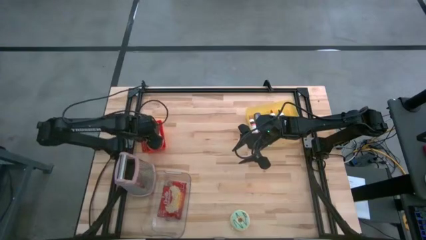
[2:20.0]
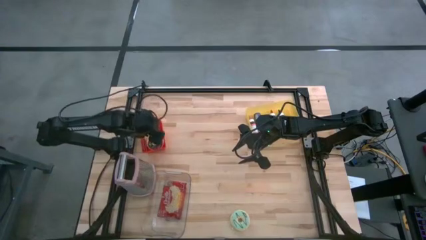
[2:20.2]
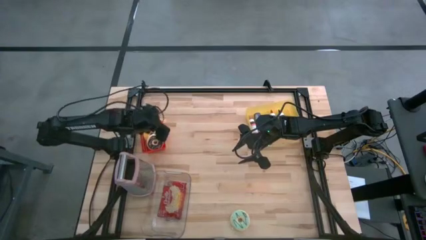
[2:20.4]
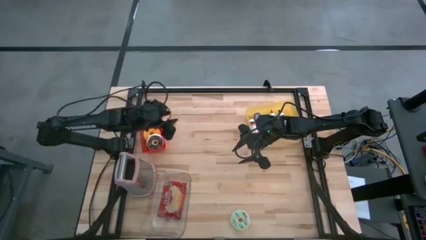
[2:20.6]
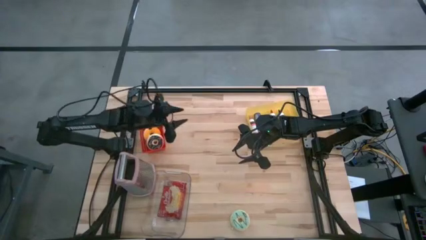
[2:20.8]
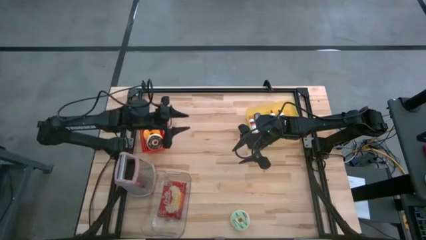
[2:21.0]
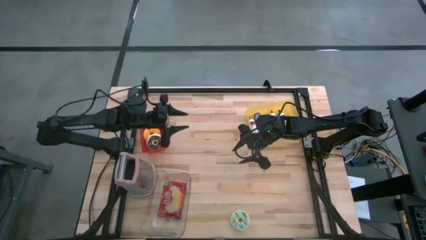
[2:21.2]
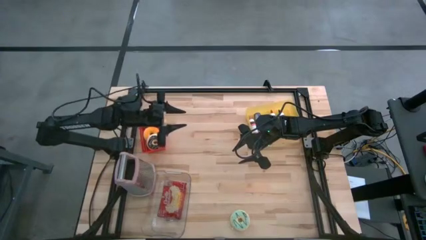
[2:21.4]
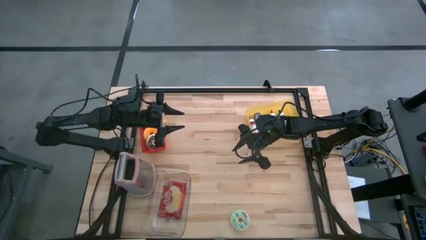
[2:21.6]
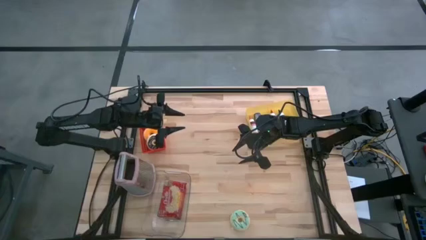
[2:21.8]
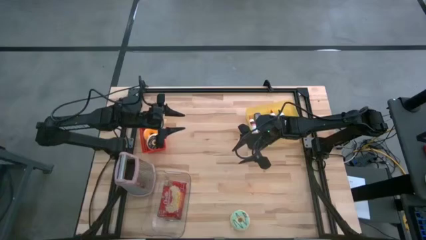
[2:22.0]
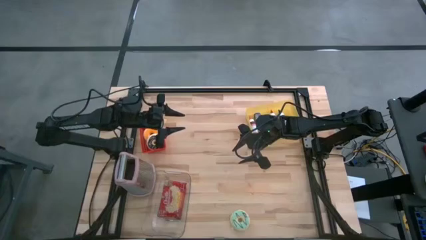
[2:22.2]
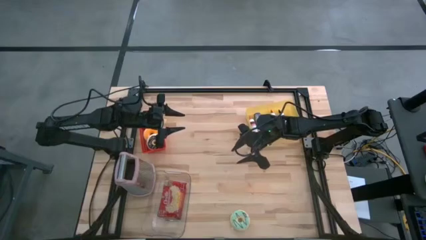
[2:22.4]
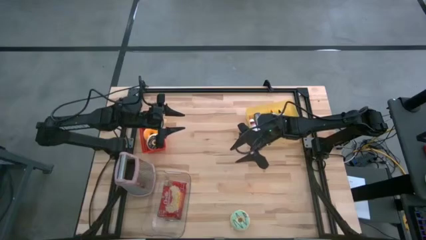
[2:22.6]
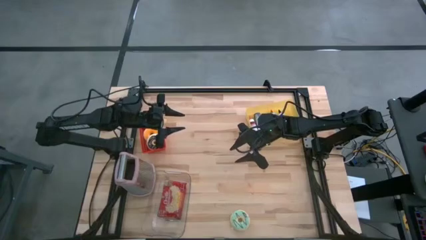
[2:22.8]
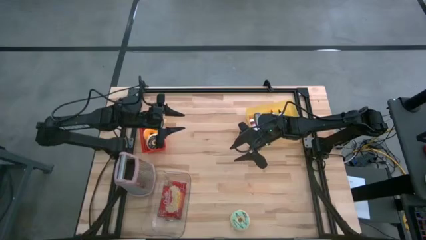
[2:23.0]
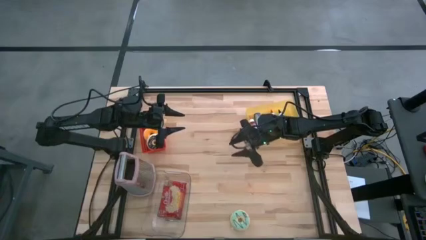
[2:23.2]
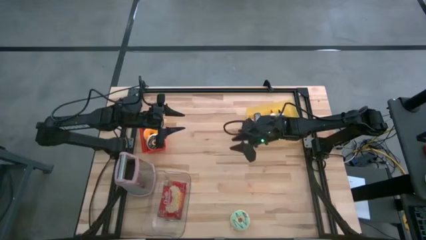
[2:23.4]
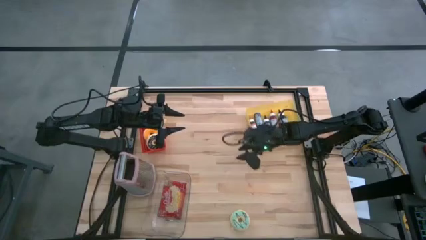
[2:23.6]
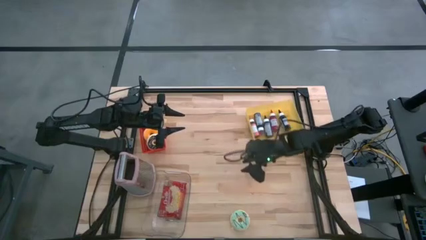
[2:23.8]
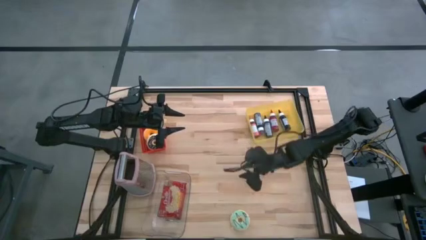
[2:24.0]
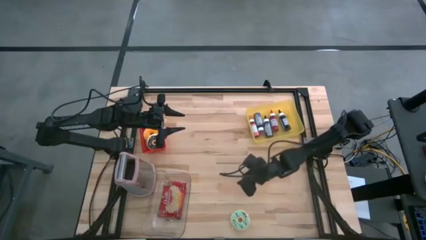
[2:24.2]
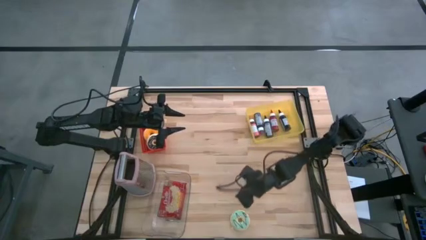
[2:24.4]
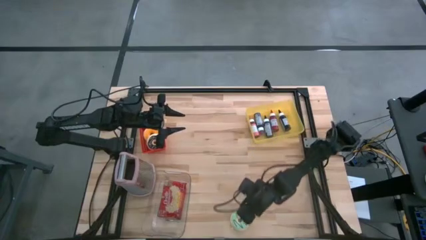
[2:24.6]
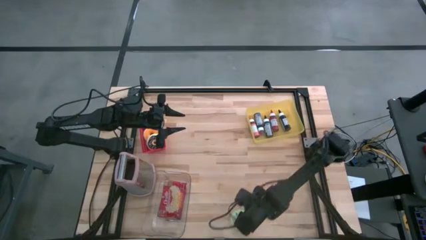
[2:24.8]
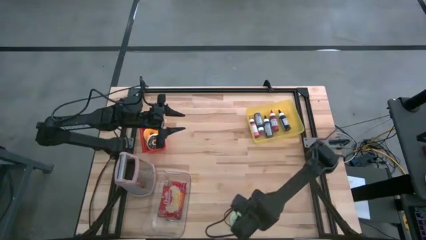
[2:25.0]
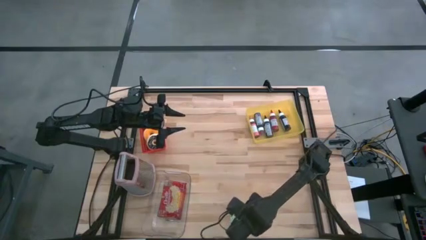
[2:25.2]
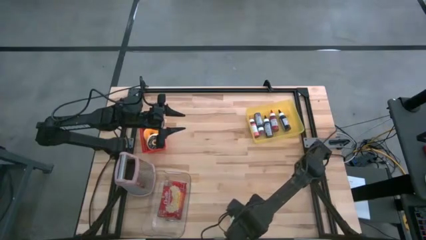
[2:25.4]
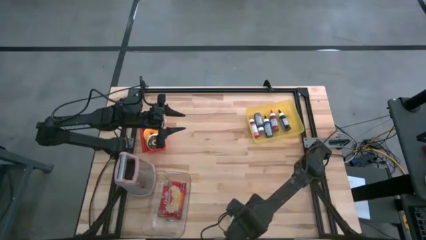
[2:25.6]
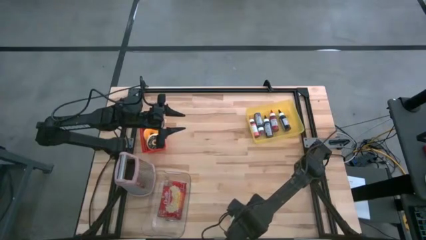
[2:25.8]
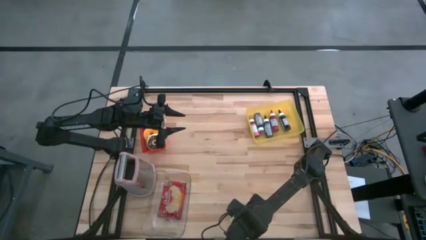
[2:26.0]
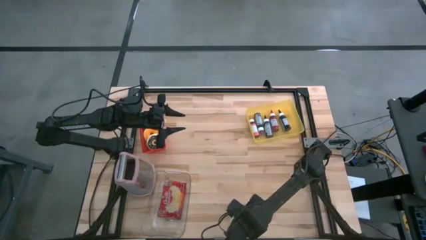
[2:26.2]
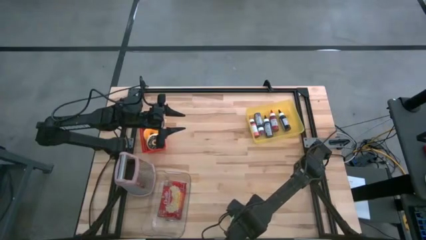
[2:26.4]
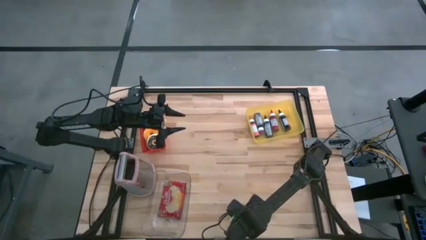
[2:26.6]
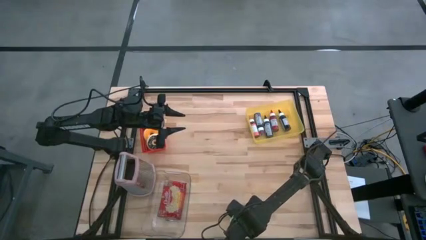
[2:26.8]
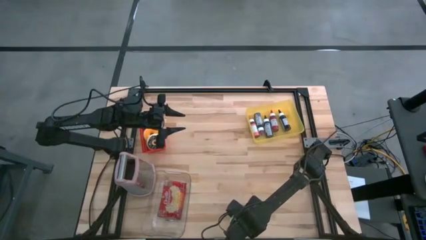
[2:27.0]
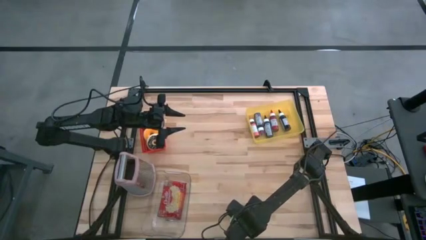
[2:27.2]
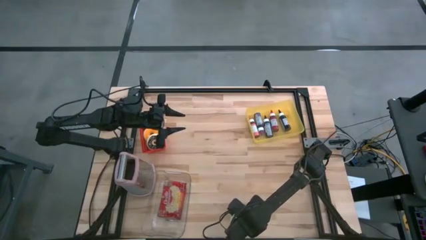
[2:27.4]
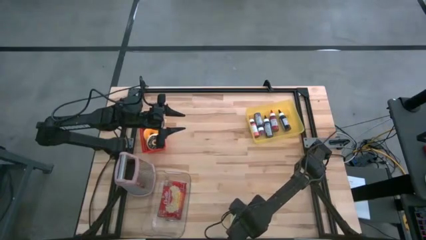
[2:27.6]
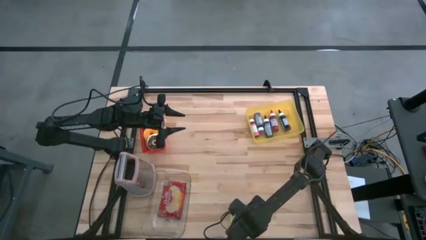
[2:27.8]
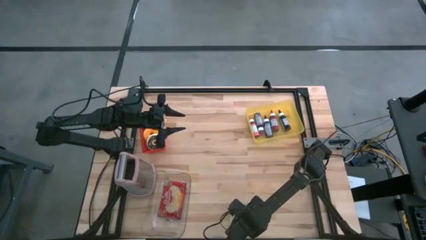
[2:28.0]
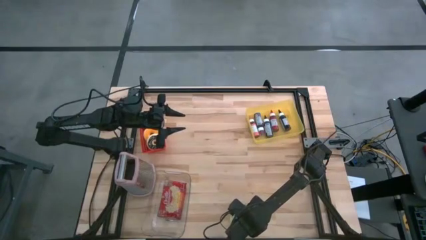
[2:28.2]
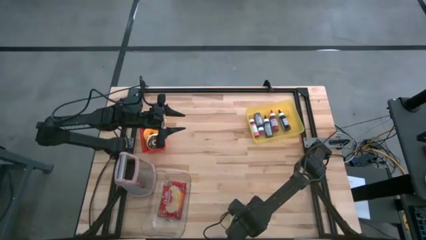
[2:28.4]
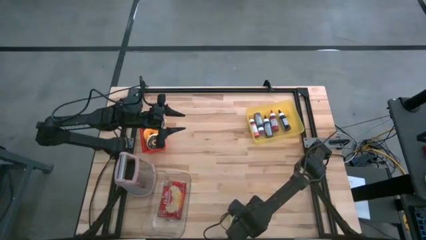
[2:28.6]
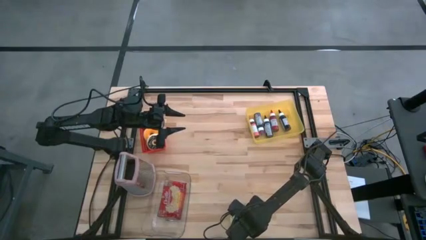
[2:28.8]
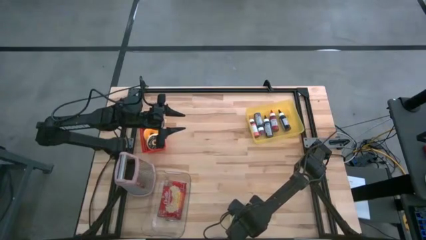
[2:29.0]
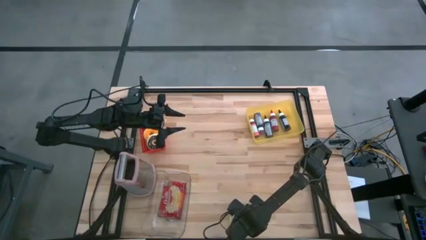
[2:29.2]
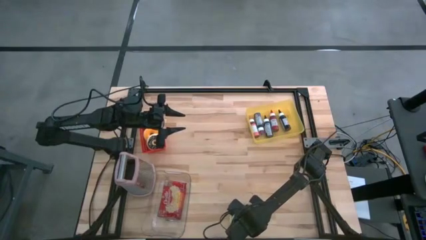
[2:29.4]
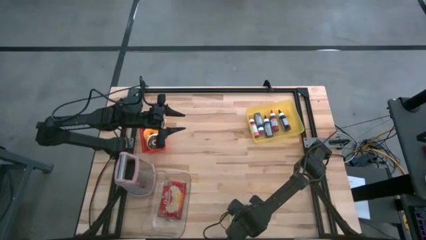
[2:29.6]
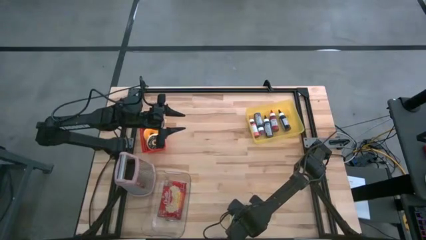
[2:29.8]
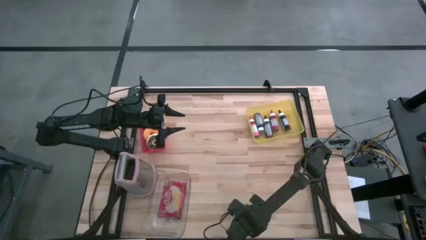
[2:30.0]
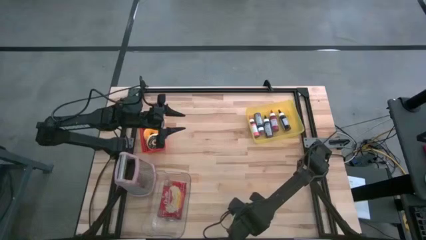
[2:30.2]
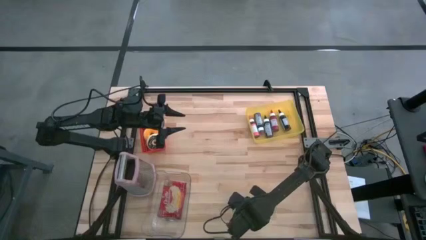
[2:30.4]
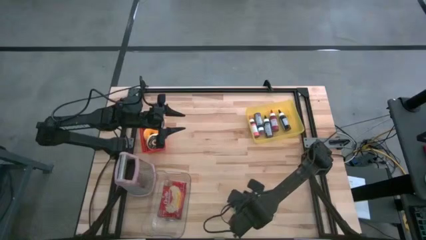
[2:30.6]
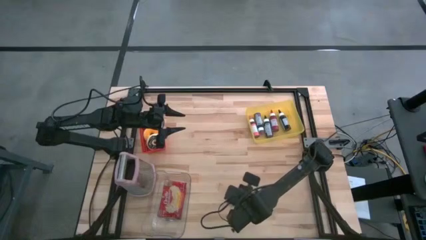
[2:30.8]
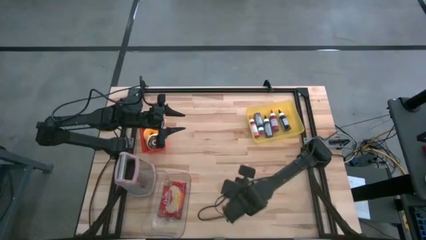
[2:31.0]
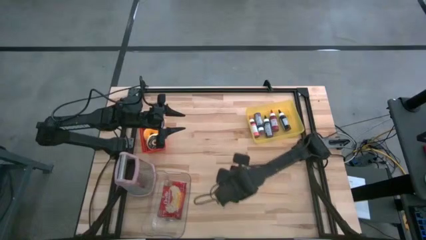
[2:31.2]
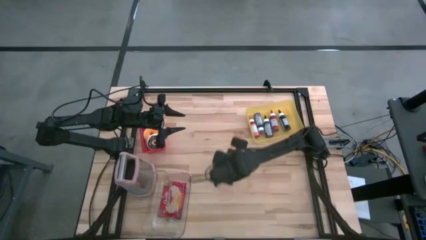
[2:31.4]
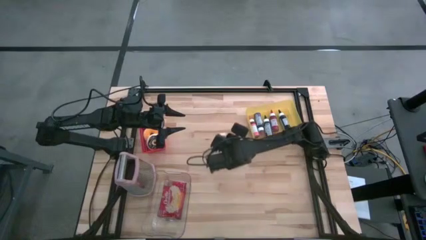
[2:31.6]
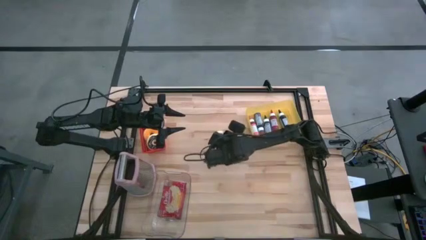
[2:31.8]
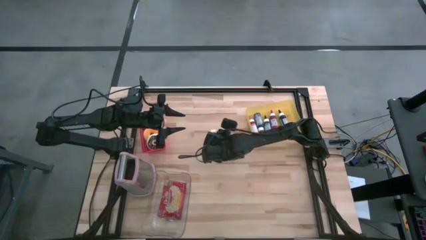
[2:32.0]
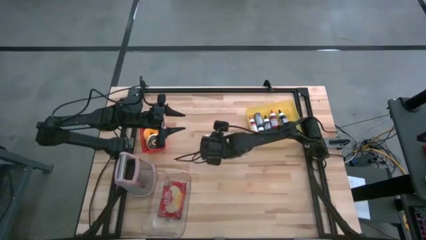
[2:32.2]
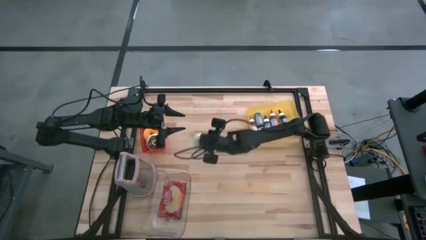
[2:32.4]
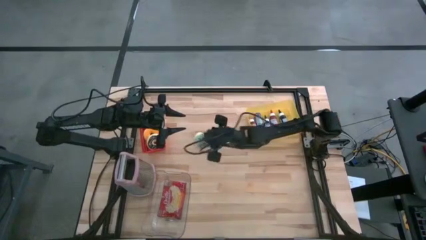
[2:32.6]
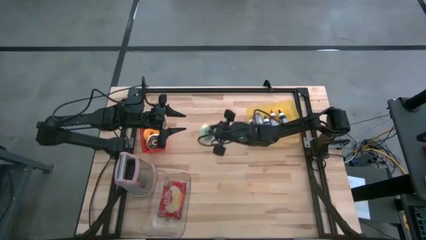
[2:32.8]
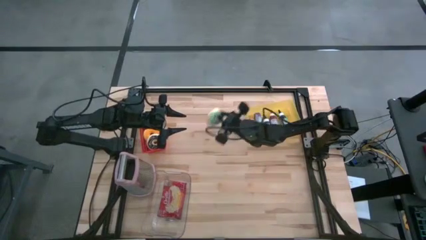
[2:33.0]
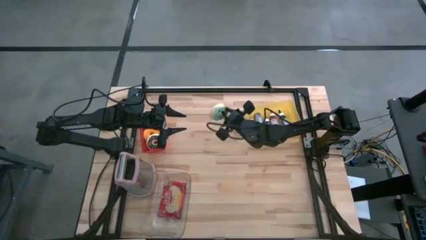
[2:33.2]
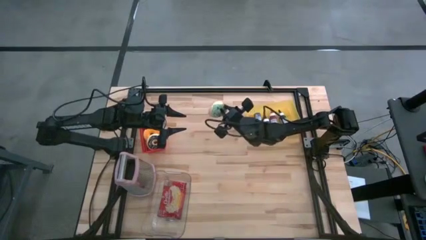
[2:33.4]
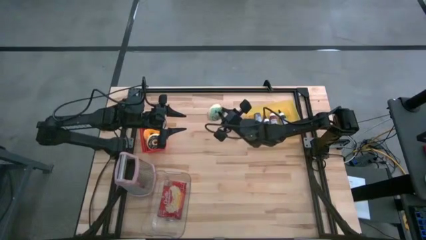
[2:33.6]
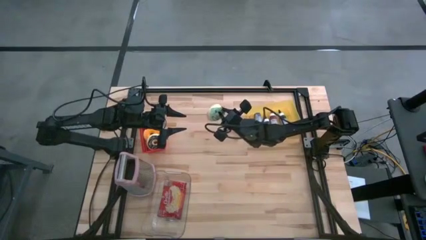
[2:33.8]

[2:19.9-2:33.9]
Task: Pick & Place Food Item
Put the green donut into the red bin
